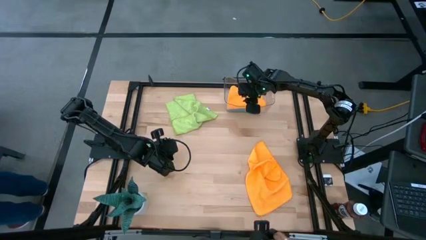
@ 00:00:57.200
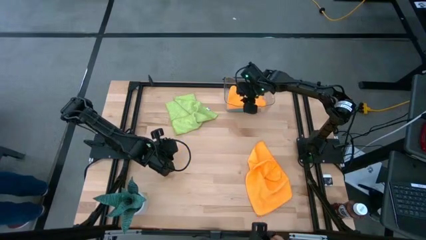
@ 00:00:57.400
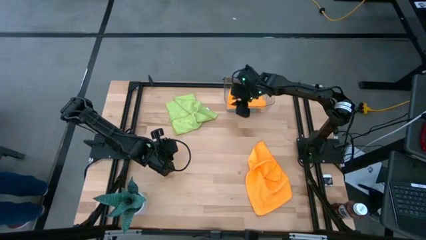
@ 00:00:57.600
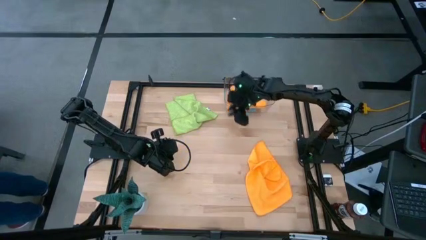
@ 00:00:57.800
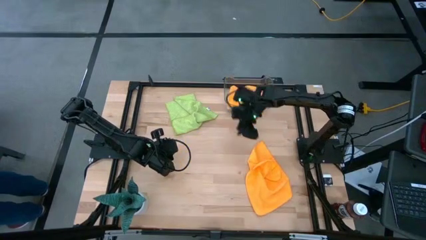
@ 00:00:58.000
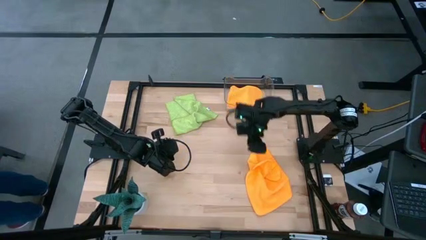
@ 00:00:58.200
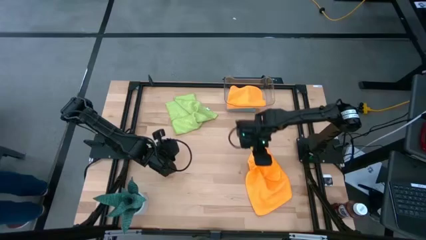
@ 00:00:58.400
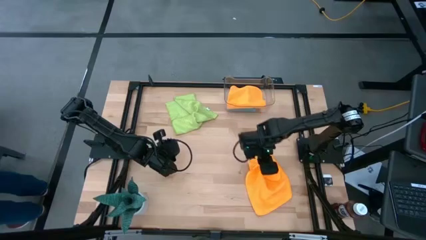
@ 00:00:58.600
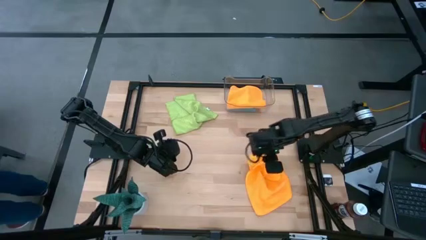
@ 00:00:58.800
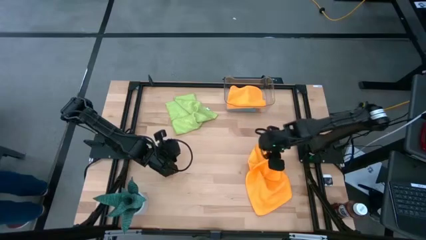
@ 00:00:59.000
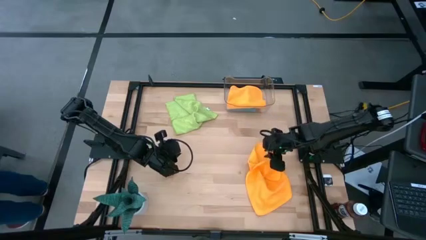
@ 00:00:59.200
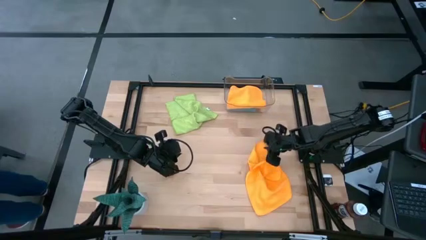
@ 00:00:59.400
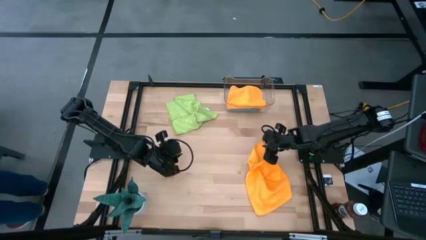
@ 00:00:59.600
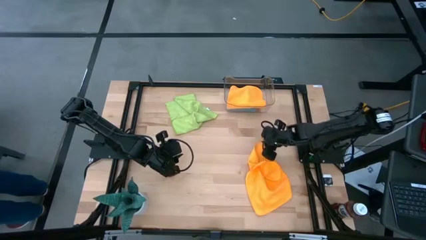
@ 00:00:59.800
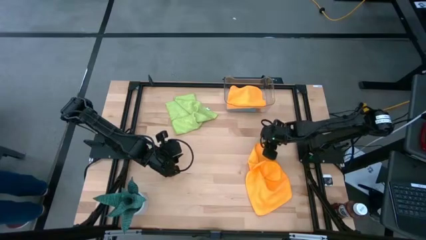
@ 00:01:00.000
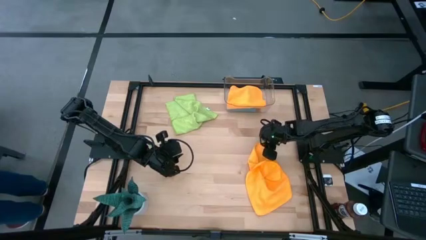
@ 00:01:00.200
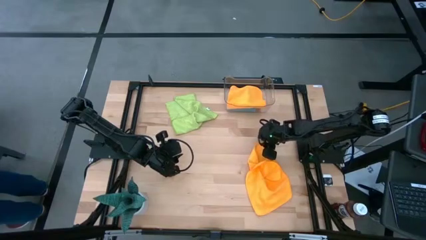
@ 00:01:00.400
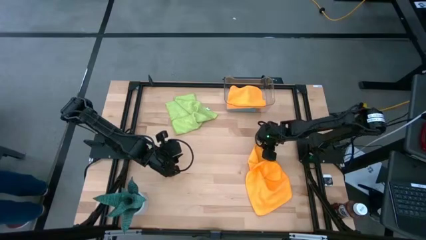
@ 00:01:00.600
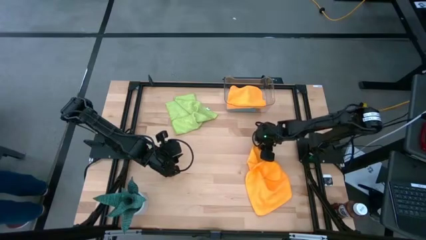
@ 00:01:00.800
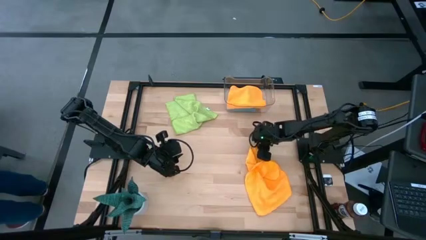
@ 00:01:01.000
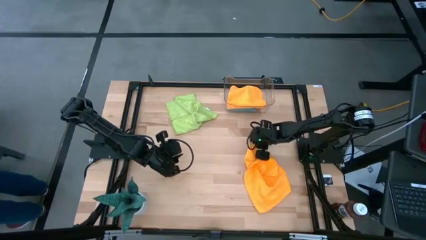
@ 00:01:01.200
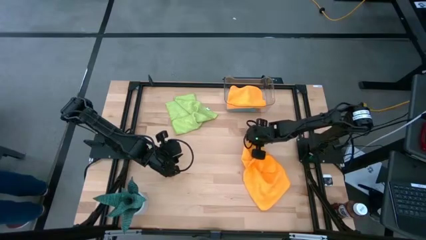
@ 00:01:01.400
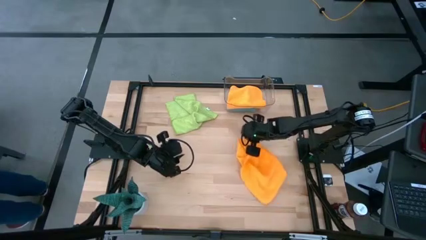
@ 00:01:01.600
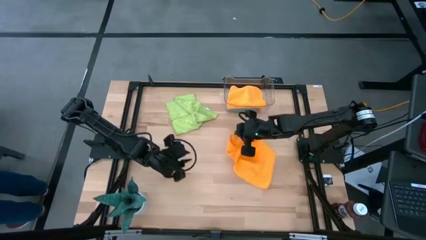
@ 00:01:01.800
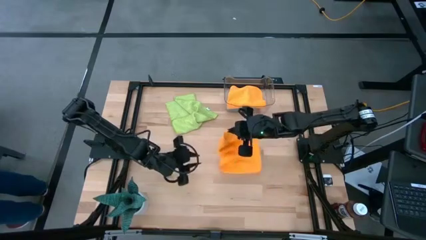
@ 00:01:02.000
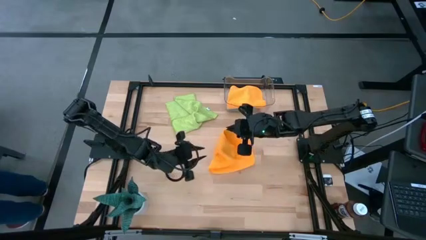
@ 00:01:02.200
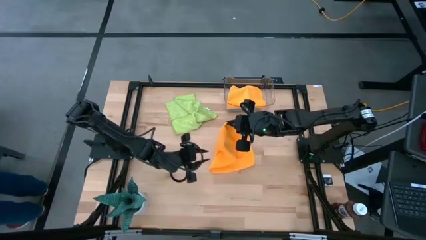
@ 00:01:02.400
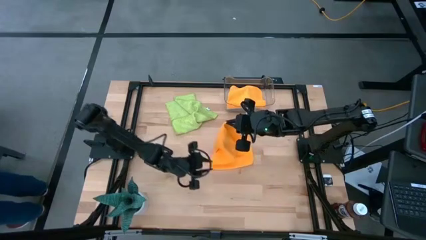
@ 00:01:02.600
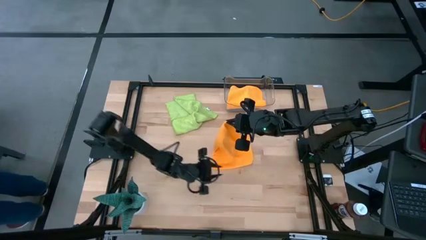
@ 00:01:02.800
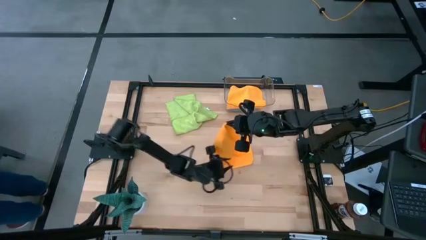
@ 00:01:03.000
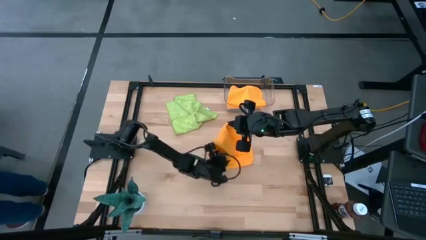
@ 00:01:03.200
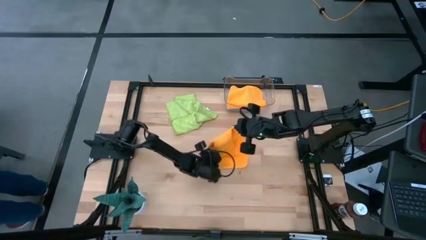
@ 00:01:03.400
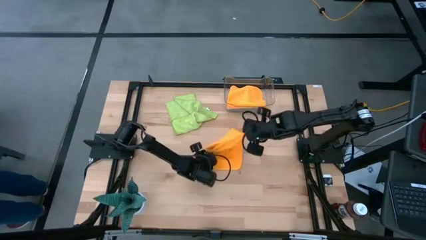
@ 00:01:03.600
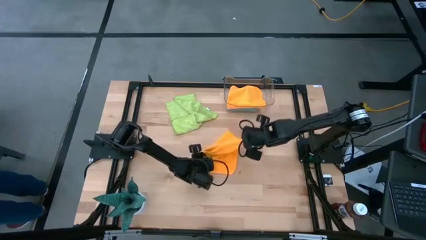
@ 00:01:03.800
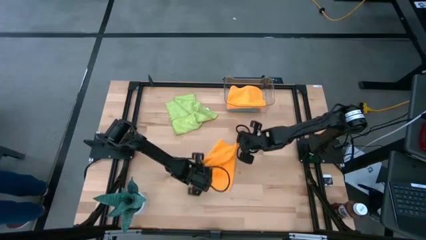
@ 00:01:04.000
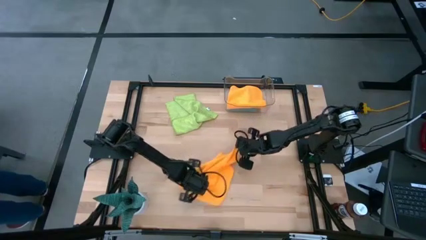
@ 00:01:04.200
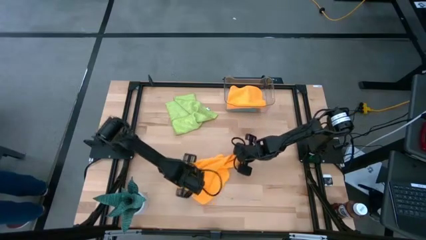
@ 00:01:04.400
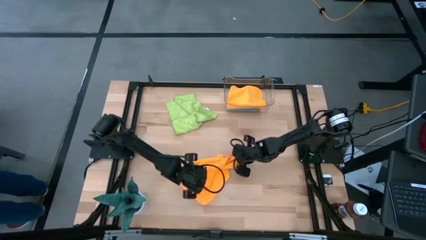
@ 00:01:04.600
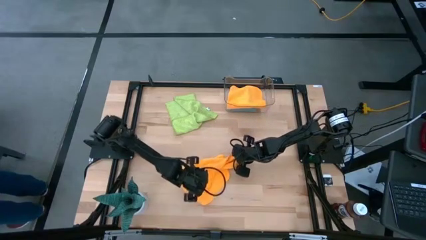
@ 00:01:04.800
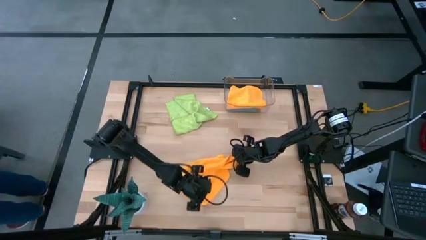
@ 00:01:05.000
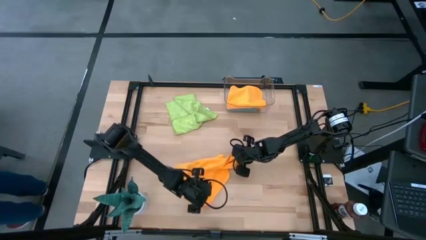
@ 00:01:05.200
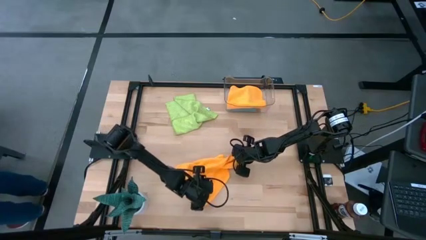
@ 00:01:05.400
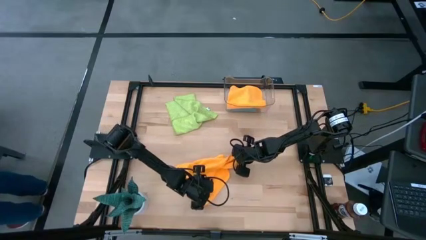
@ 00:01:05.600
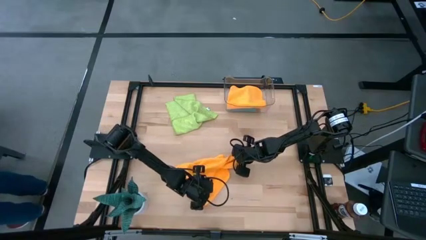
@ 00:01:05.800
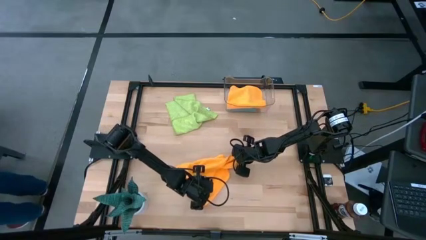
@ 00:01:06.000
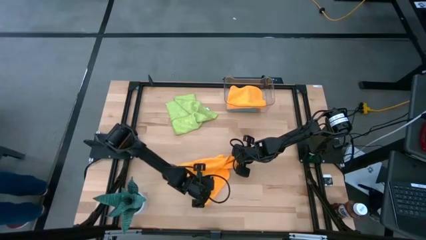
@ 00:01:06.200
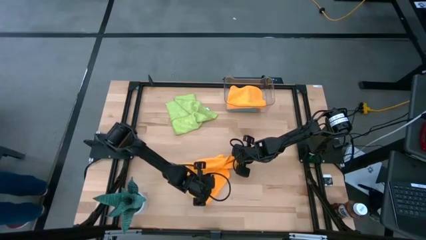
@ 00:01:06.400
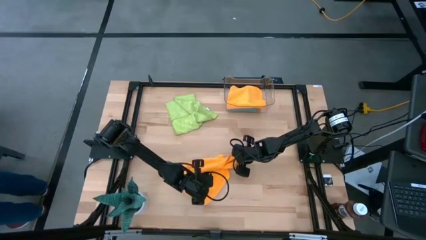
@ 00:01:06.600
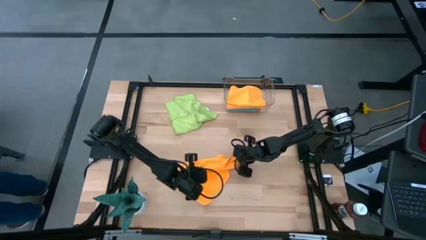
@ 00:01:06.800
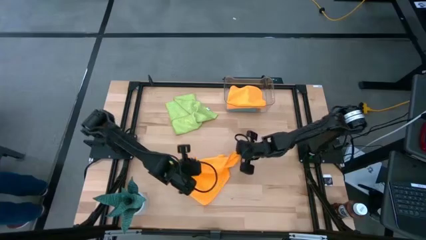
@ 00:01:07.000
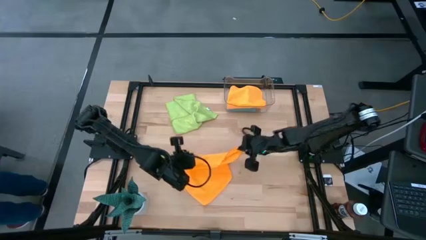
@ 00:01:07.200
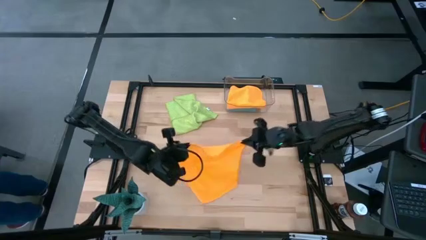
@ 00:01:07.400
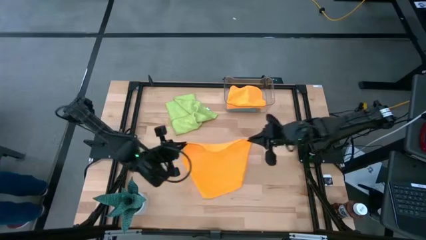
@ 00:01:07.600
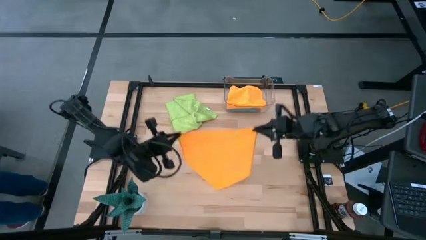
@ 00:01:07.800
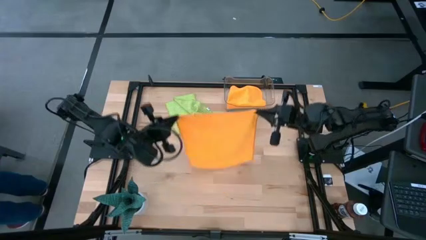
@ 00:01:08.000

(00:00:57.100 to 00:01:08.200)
Task: Fold microfiber towels
Fold the yellow microfiber cloth

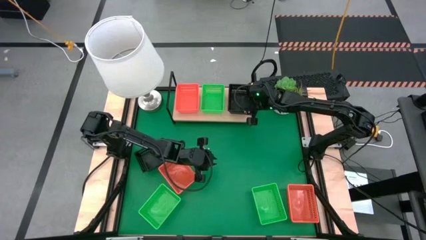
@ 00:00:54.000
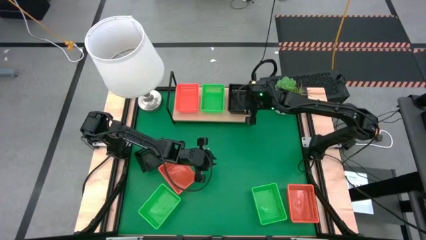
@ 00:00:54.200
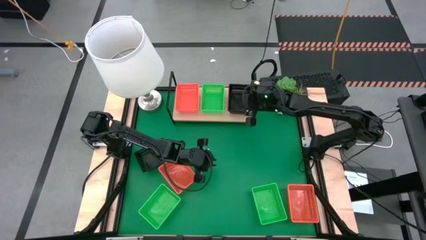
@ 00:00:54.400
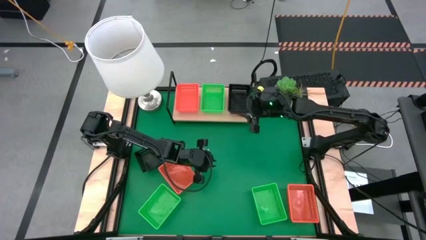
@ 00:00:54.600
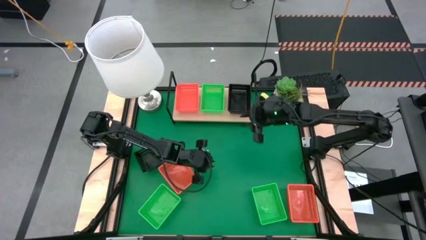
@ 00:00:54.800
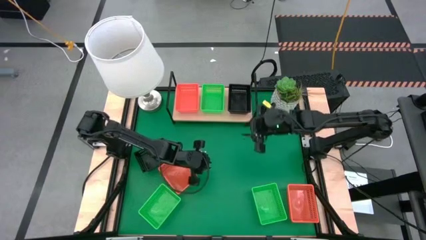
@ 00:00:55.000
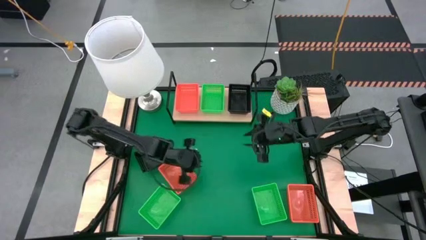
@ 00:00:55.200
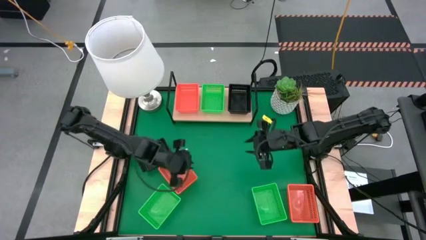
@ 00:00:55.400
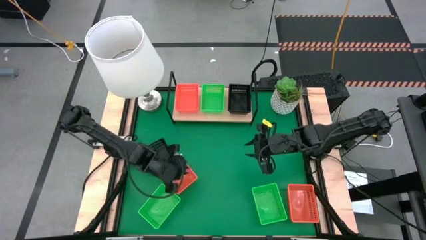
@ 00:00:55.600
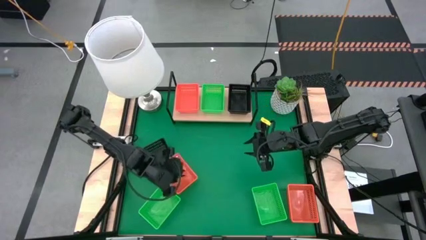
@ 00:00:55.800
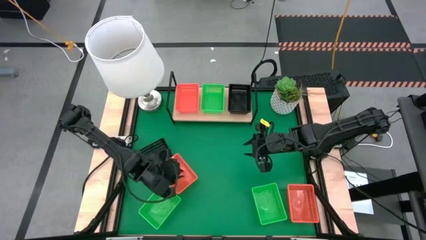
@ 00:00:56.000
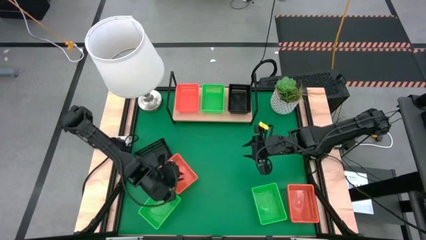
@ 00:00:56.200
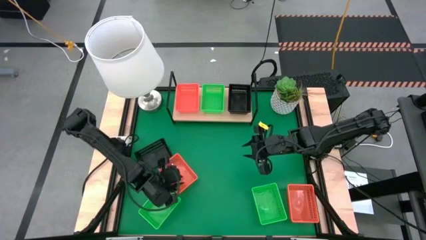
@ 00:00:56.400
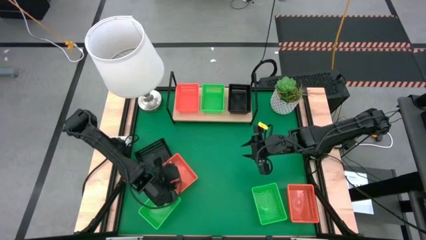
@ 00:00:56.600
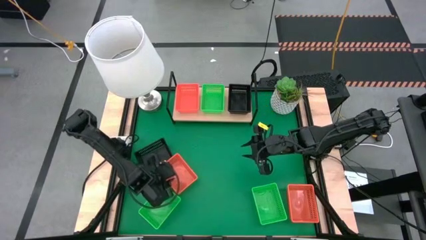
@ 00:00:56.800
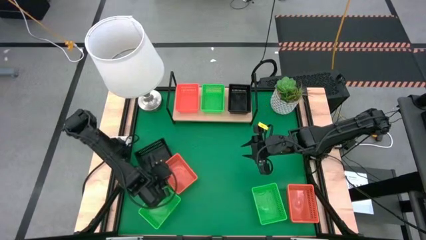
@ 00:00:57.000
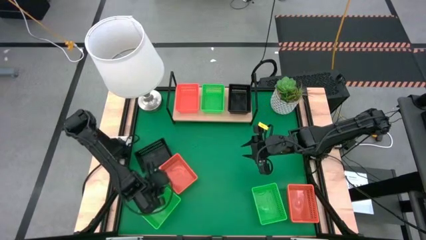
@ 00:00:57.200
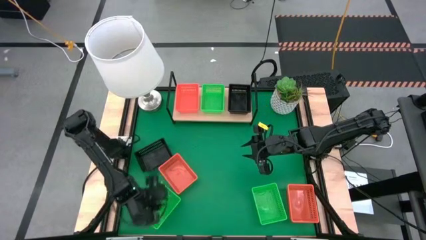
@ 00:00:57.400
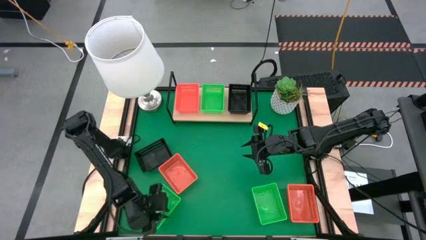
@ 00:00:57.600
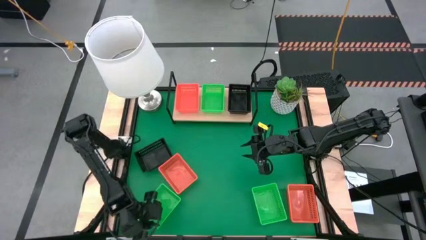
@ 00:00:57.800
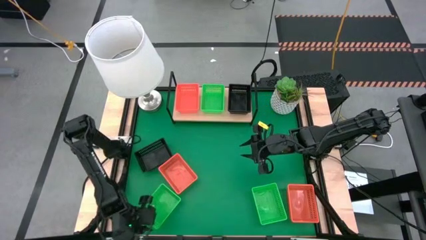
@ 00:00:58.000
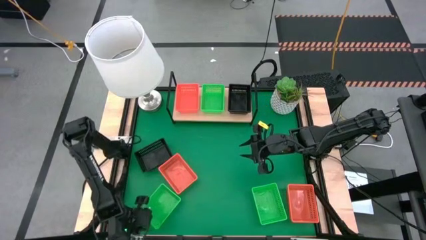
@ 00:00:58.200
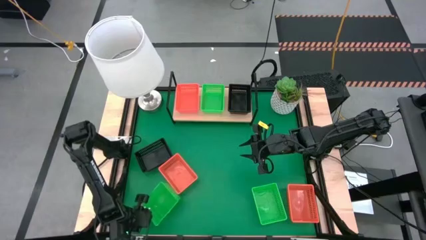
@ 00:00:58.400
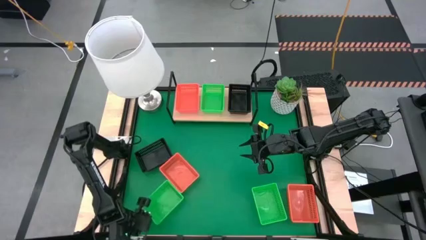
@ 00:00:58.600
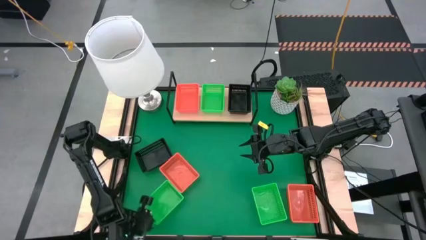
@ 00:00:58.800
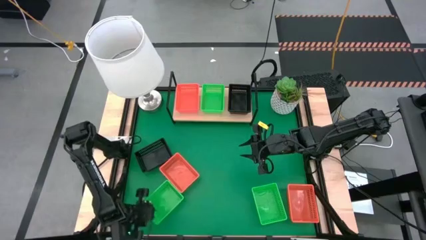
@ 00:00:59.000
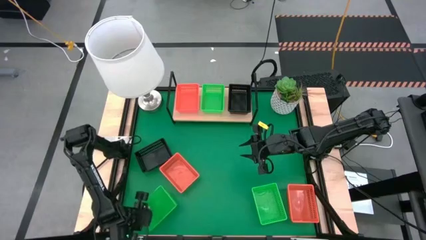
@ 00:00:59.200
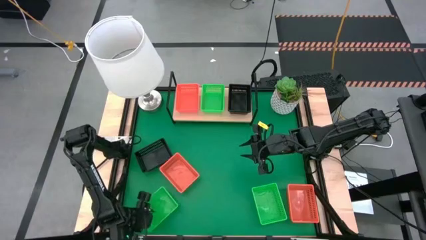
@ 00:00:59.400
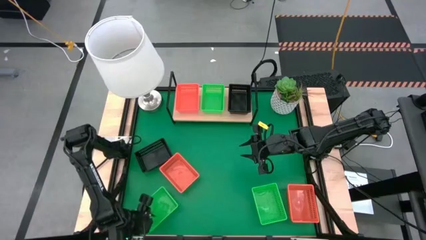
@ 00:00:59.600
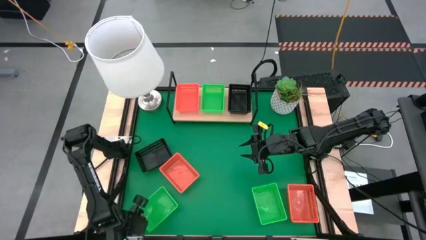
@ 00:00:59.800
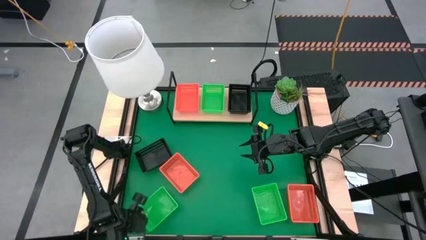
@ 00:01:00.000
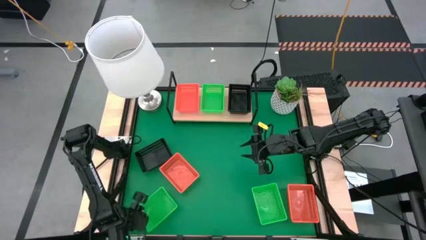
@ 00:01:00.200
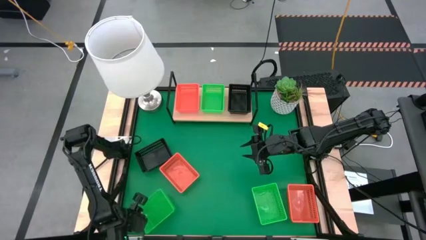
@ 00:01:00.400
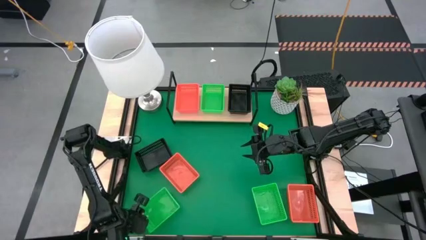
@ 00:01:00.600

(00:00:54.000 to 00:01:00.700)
Task: Stack baskets on shelf by color
Stack the left green bin on the green bin on the shelf
